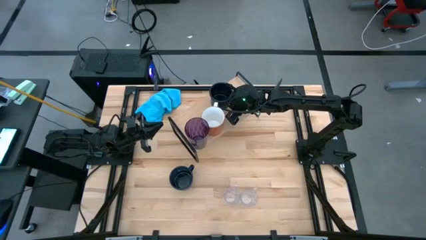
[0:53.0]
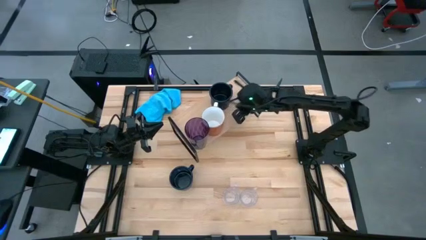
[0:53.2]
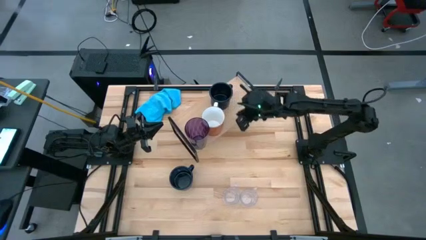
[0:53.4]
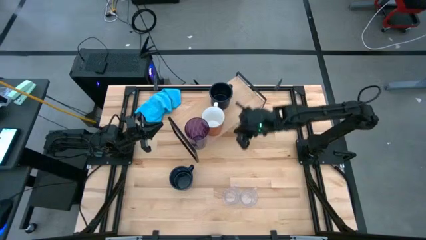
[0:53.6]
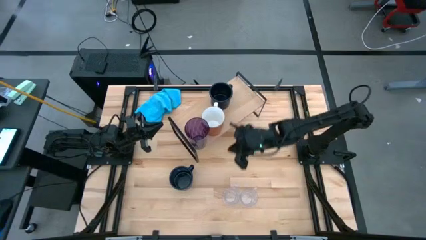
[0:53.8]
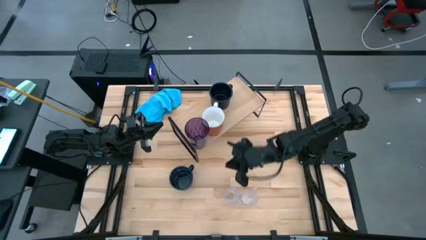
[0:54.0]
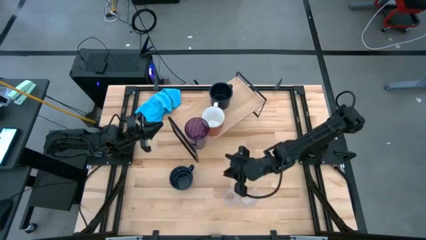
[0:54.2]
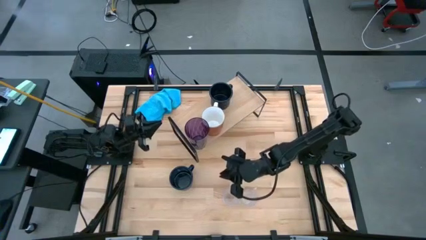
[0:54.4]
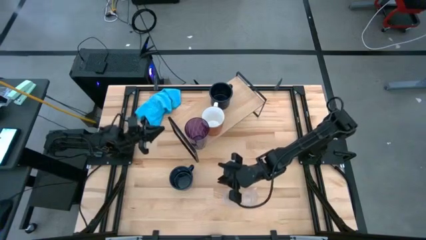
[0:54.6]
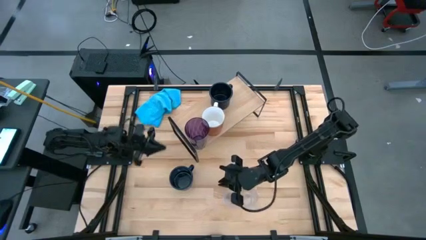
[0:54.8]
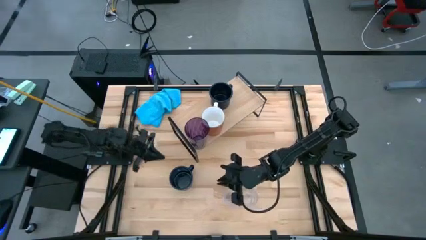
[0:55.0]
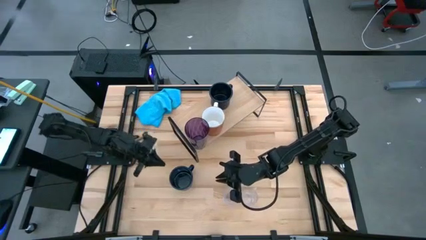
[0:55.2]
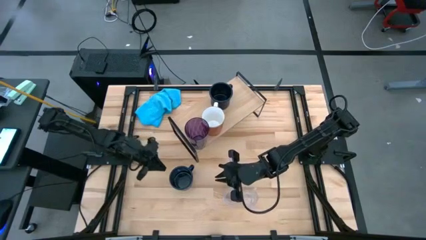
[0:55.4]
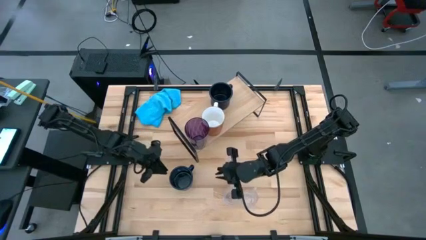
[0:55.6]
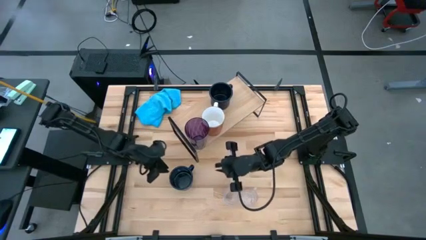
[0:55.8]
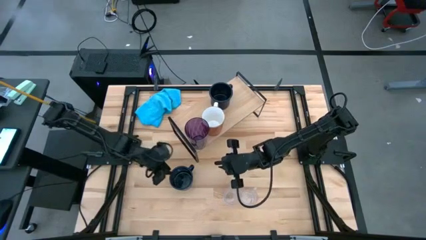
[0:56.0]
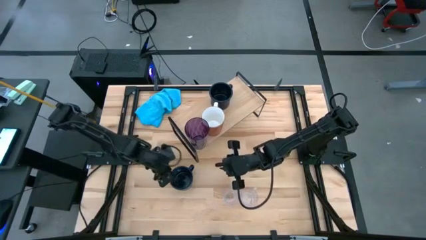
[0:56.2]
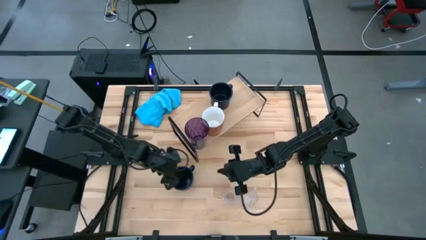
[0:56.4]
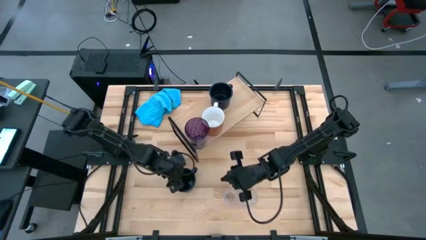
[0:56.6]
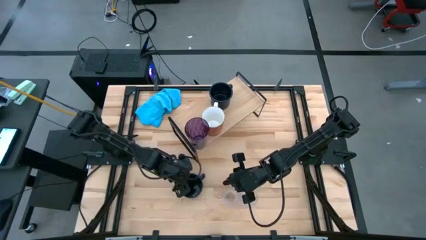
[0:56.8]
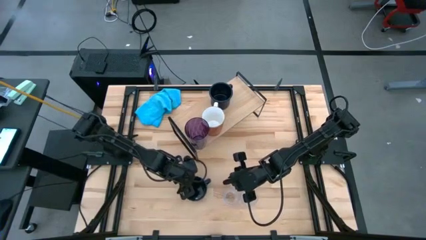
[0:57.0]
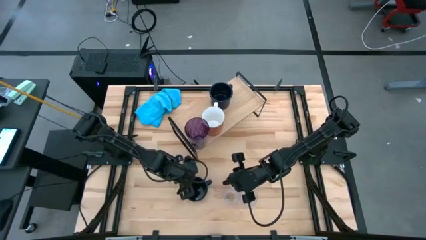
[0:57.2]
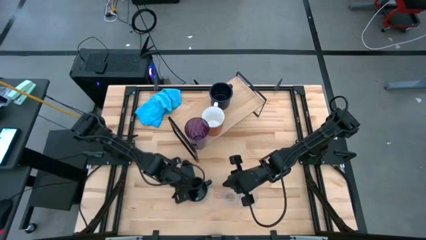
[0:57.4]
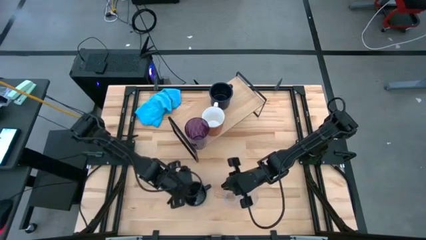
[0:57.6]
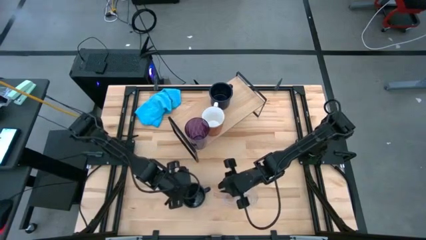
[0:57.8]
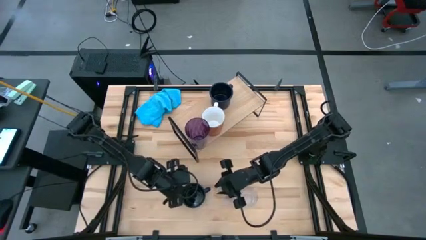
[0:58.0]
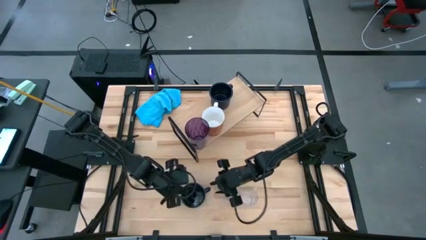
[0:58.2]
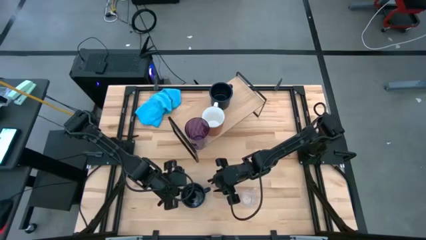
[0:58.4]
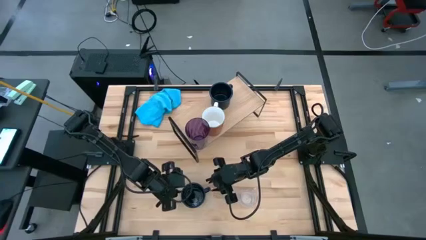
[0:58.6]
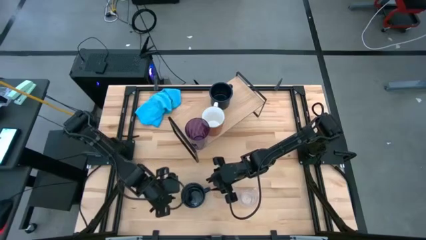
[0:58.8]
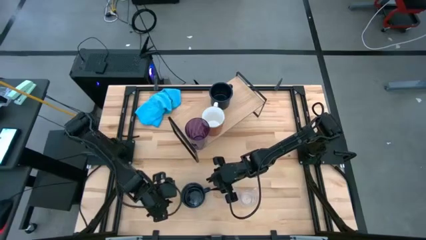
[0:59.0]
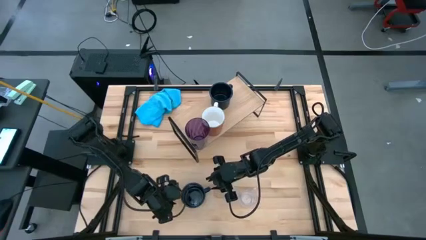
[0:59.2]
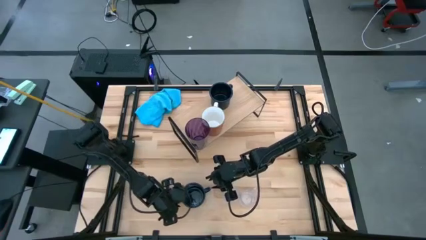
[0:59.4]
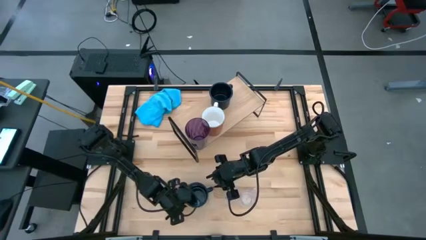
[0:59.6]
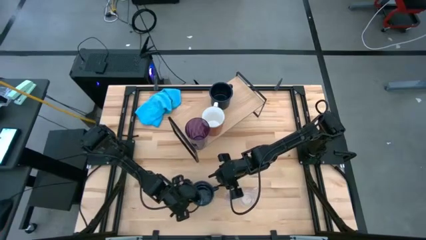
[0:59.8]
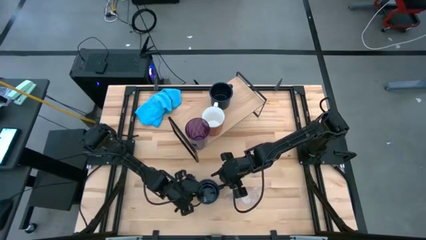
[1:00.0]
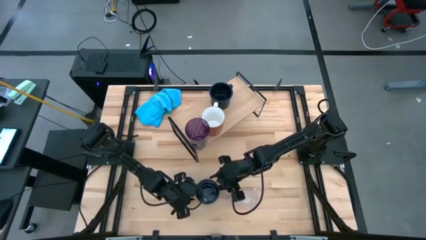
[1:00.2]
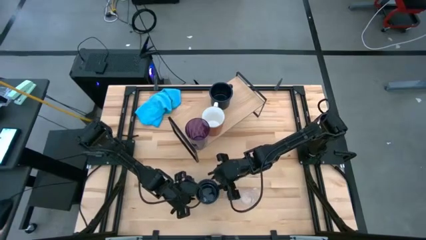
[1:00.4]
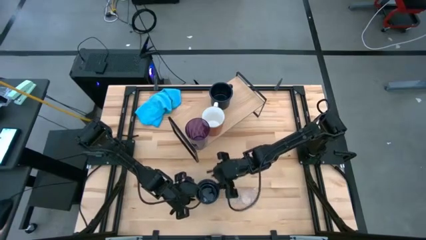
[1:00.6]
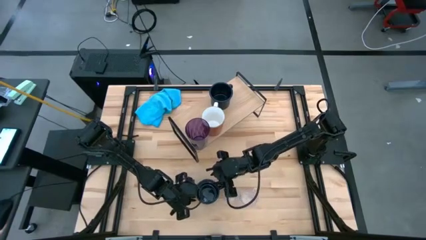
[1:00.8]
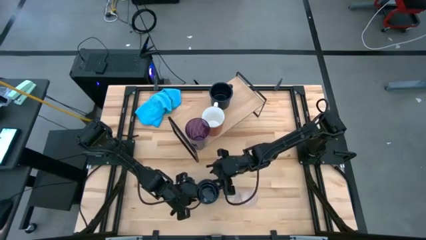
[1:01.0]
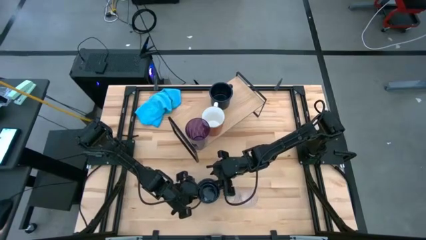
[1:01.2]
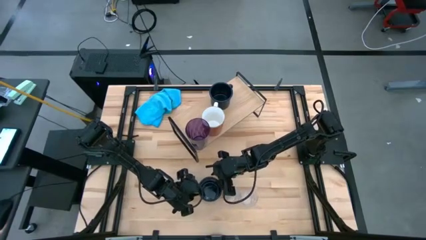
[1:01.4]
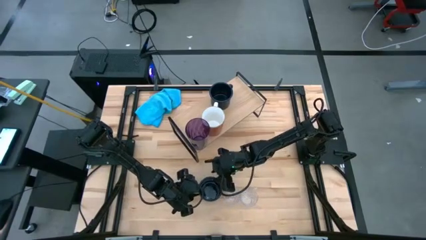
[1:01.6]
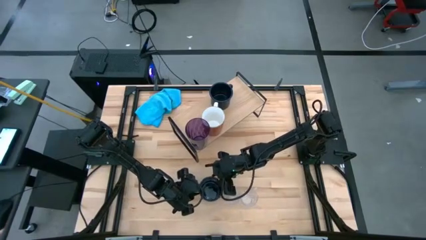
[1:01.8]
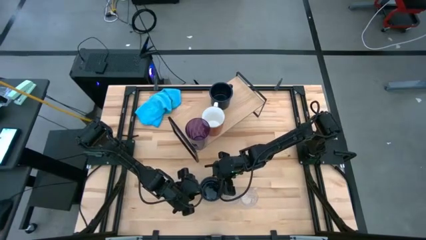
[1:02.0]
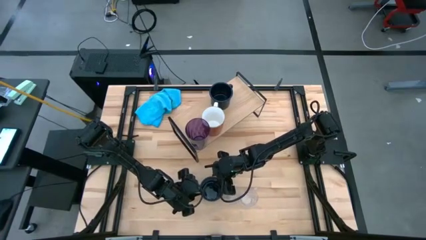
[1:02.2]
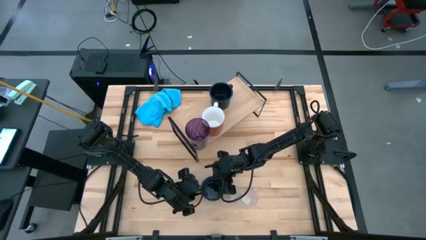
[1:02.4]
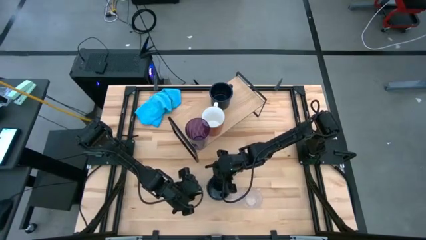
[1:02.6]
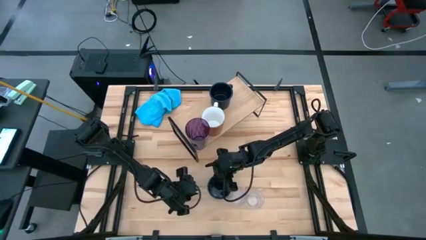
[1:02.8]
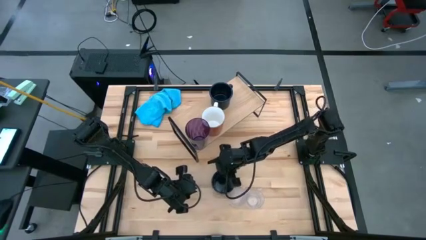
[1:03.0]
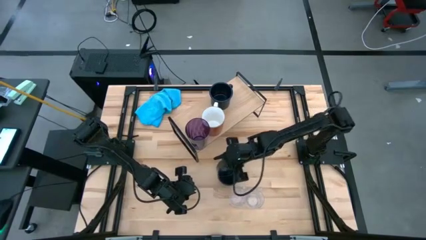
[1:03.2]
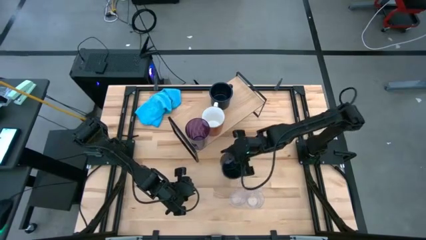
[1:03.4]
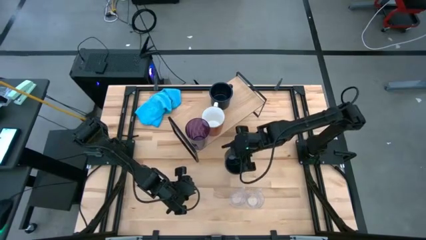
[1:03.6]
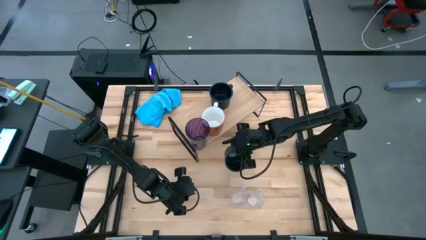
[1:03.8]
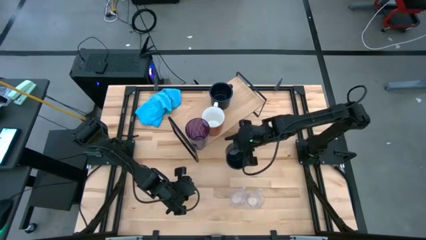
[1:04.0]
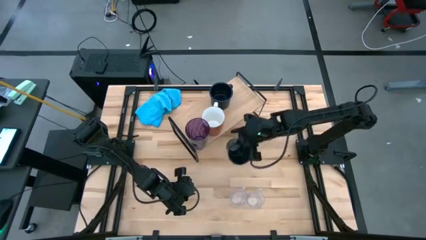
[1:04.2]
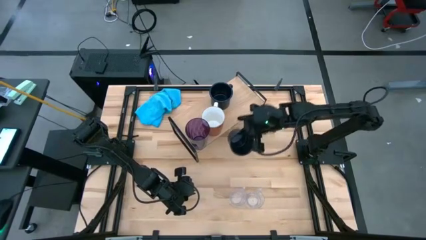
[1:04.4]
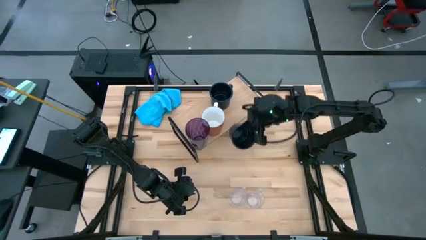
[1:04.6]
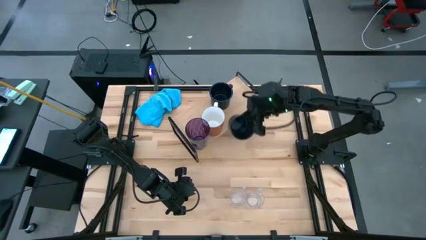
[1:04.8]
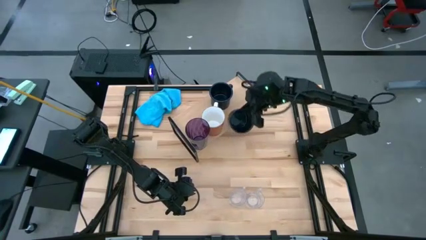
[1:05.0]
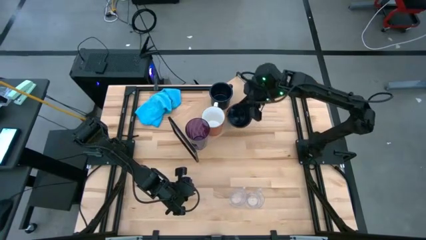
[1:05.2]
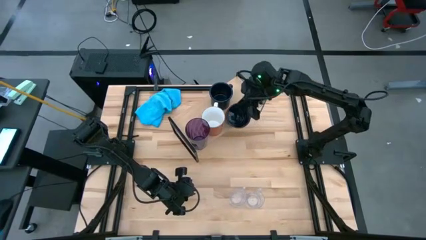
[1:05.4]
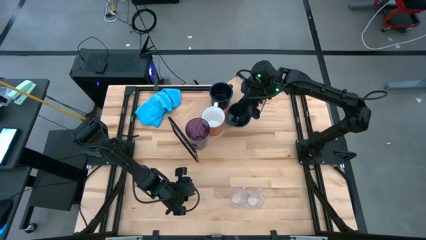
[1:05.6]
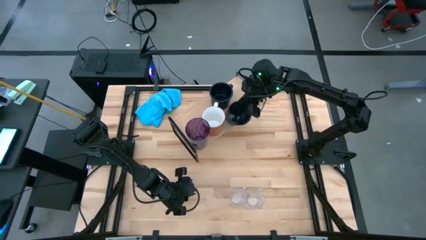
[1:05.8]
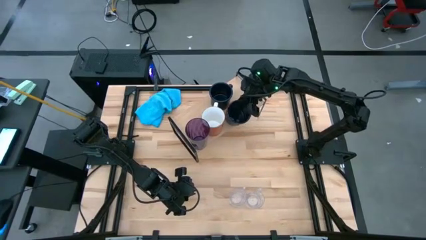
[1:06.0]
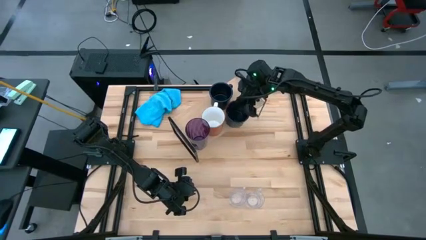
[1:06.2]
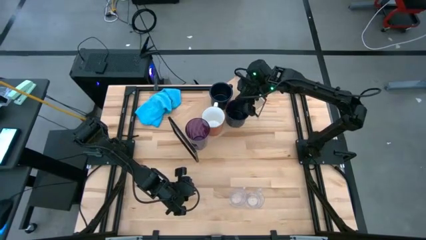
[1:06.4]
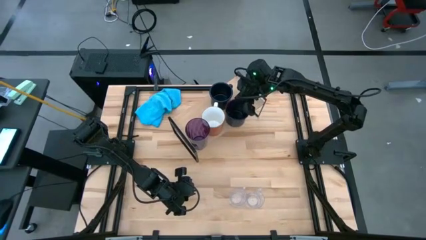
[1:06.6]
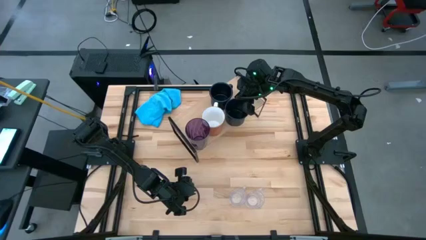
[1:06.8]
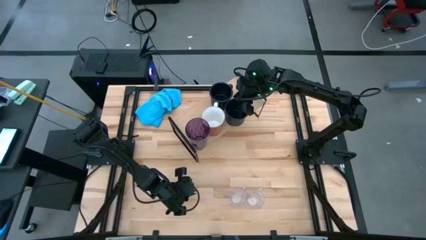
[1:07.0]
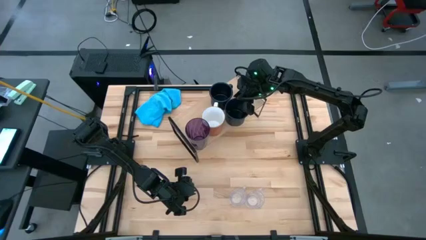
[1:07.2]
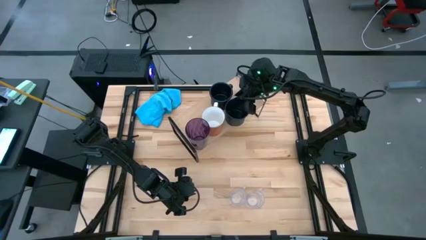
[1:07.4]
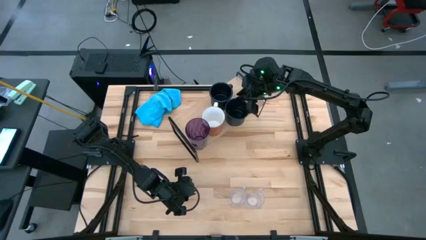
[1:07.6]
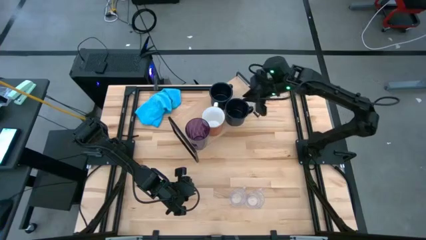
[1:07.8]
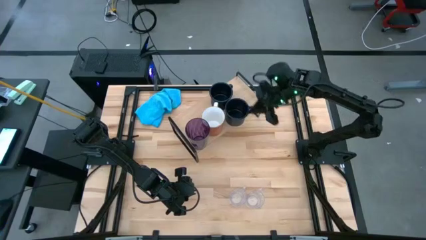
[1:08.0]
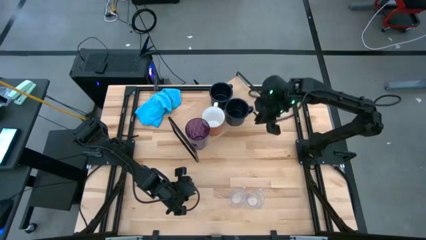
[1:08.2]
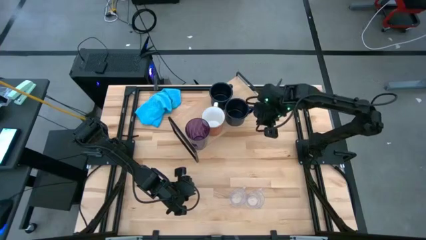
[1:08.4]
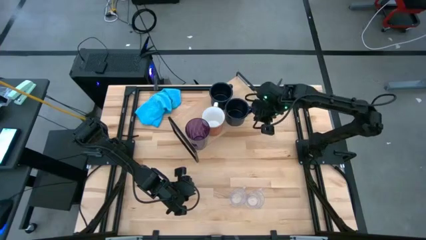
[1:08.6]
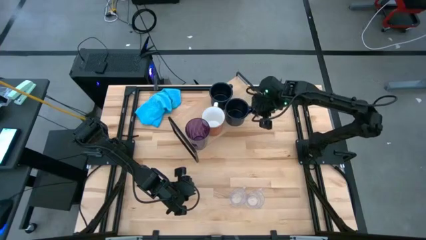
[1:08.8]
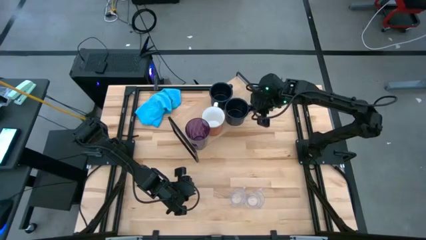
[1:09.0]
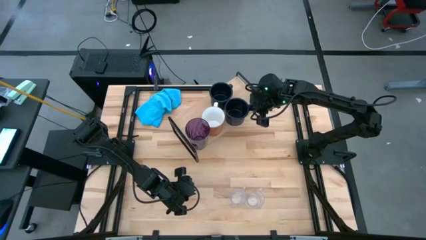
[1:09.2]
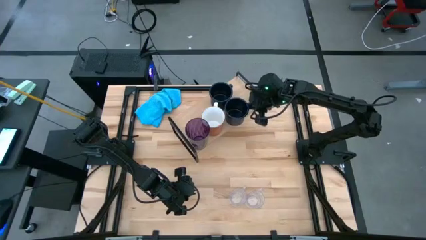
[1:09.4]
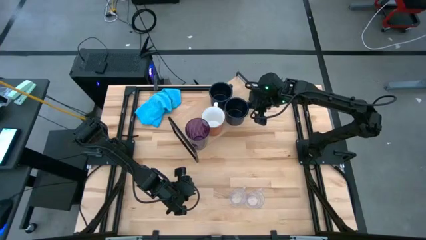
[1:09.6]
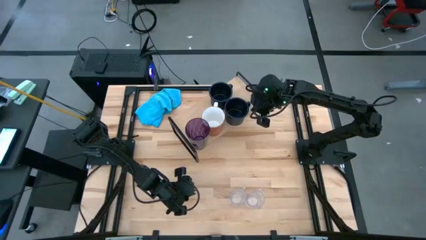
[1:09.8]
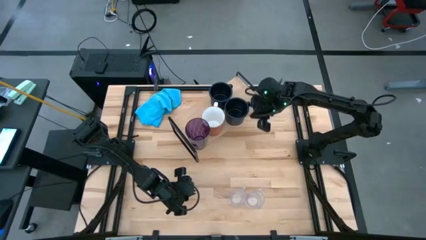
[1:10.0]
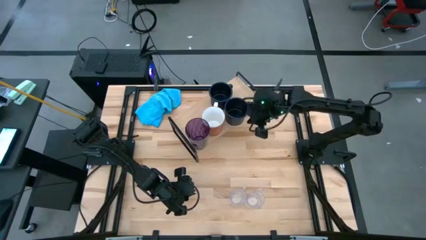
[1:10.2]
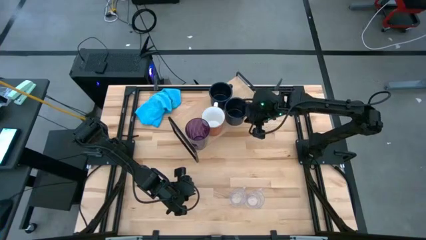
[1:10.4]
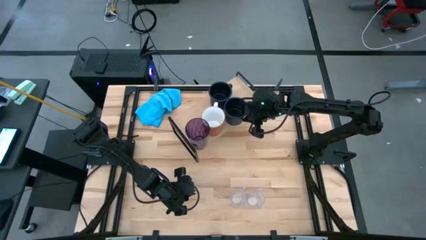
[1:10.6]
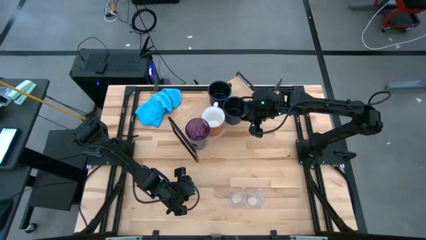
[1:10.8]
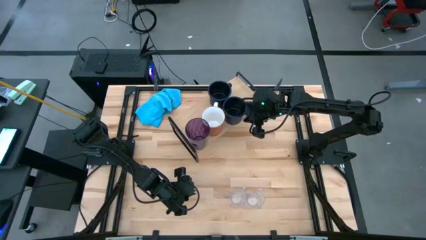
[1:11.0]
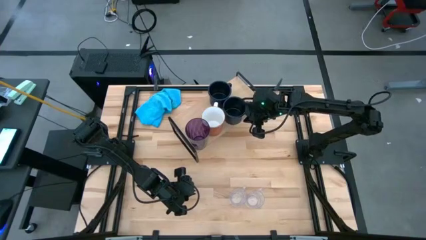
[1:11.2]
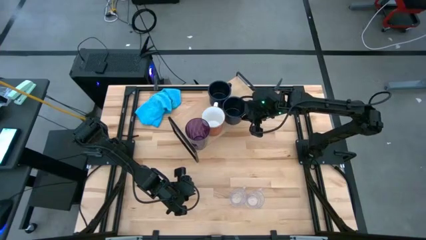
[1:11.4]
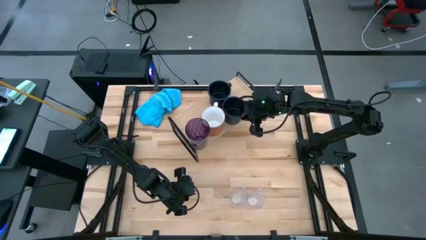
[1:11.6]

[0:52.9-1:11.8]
Task: Stack small to large cups/mugs on shelf
Put the dark blue mug on the shelf
